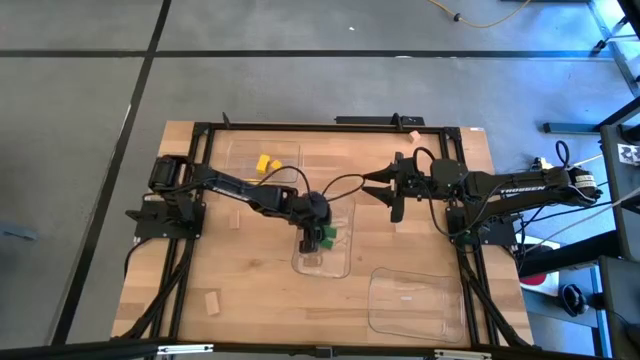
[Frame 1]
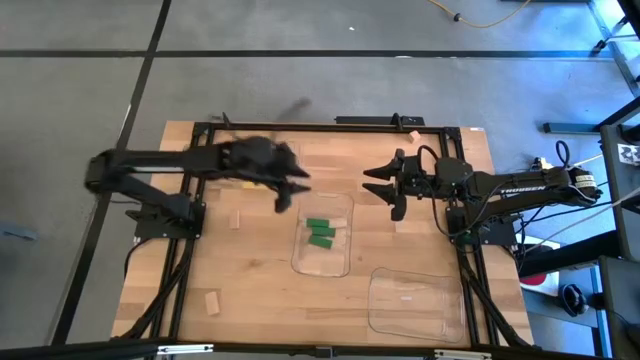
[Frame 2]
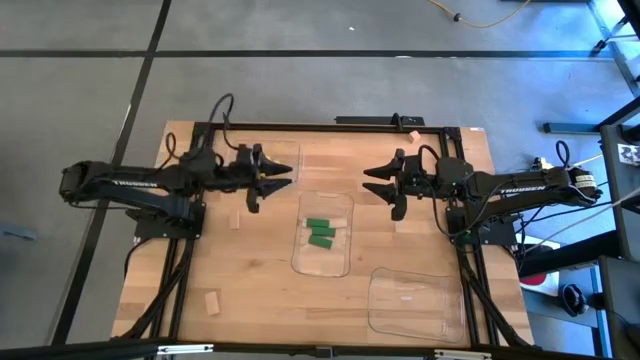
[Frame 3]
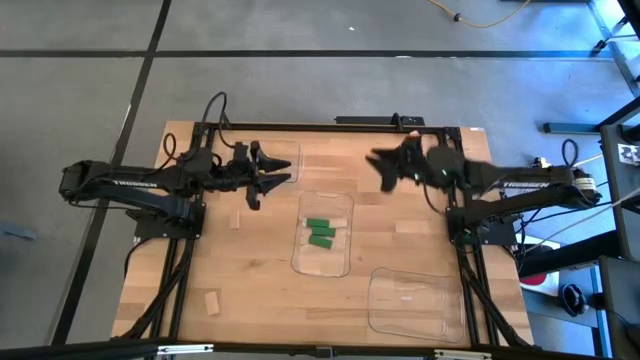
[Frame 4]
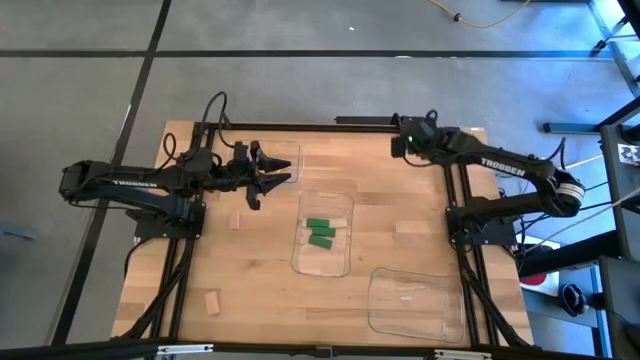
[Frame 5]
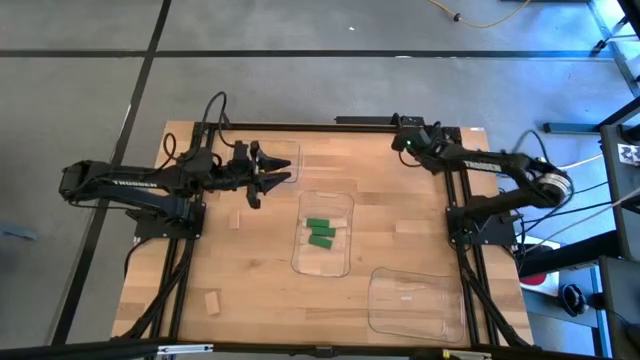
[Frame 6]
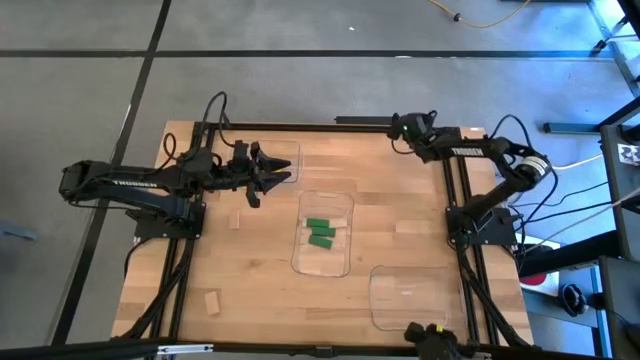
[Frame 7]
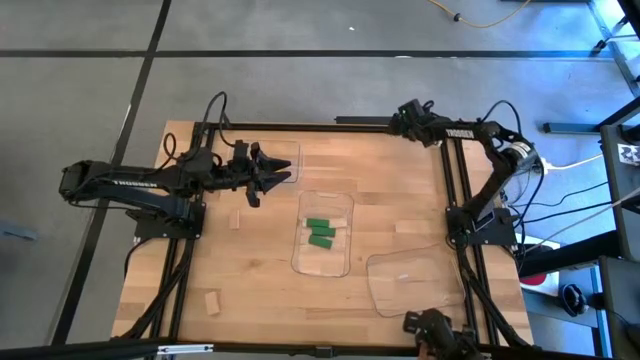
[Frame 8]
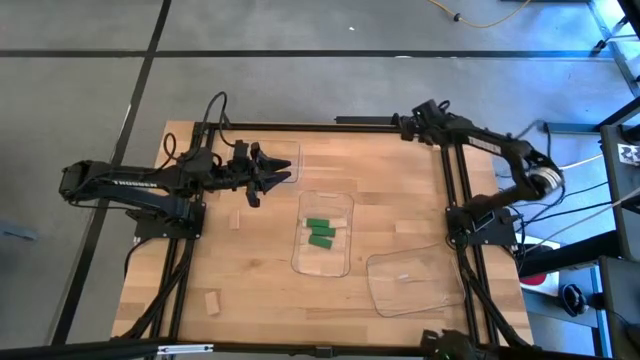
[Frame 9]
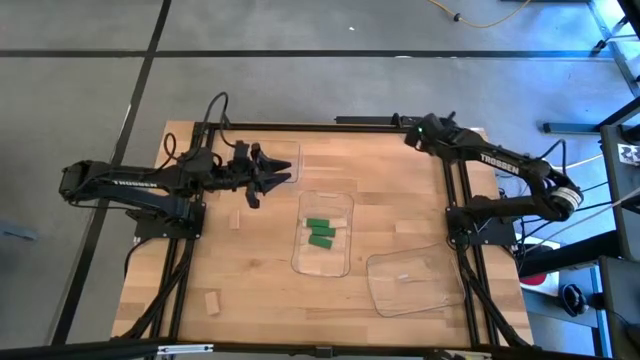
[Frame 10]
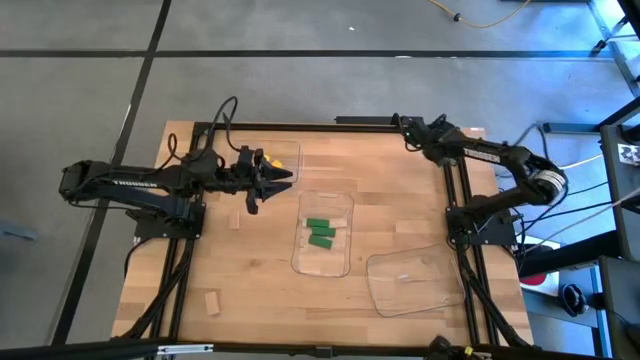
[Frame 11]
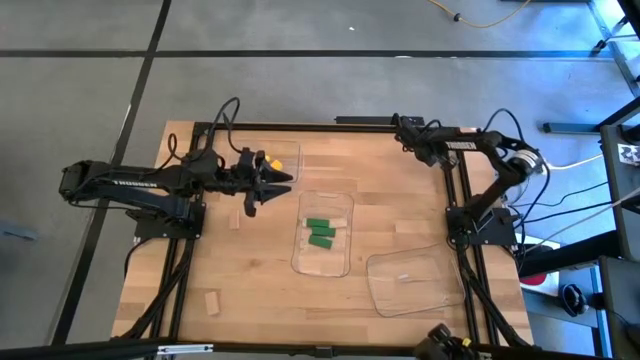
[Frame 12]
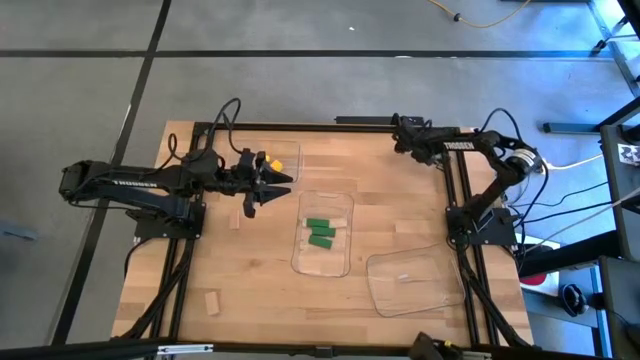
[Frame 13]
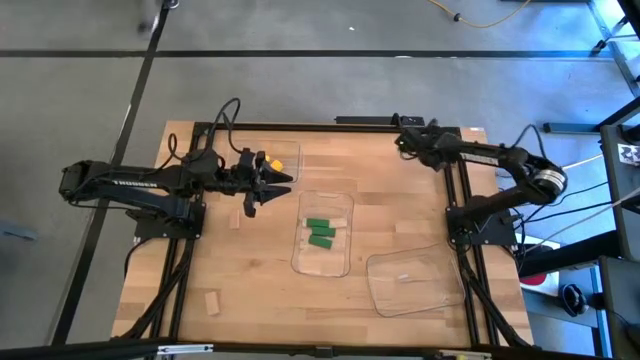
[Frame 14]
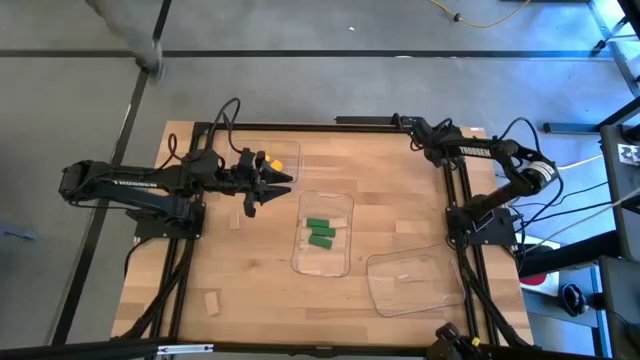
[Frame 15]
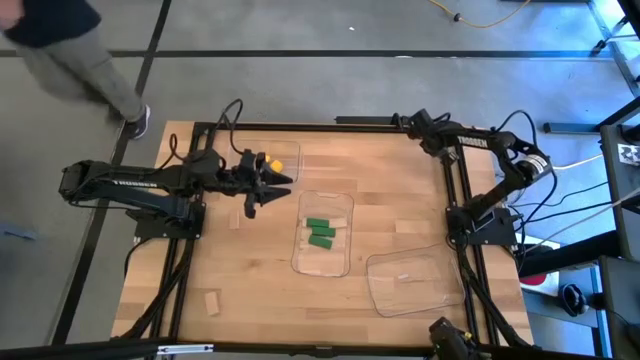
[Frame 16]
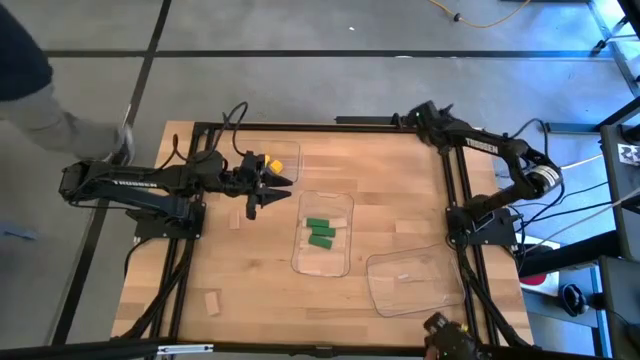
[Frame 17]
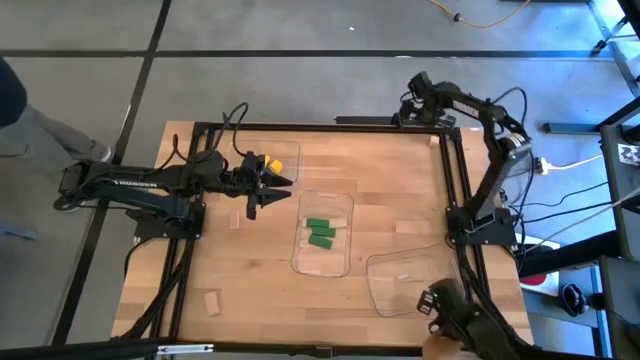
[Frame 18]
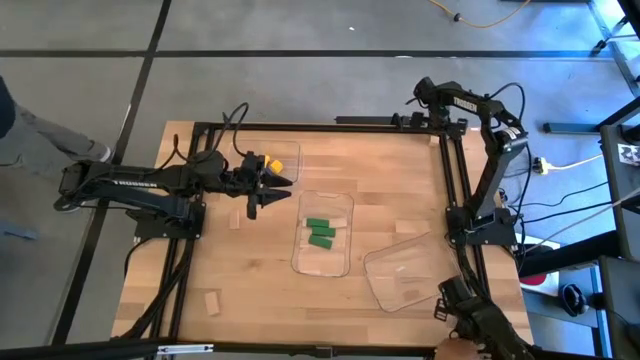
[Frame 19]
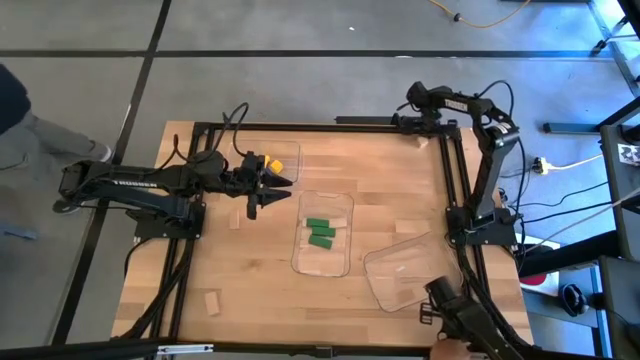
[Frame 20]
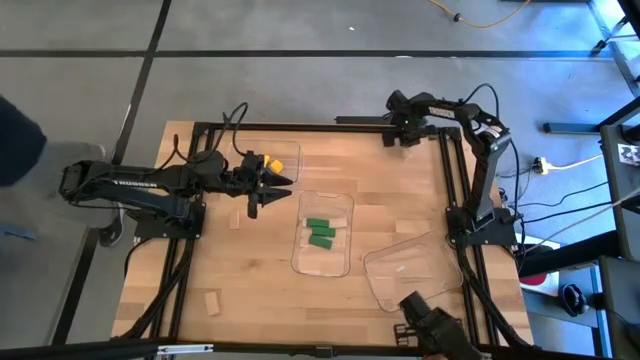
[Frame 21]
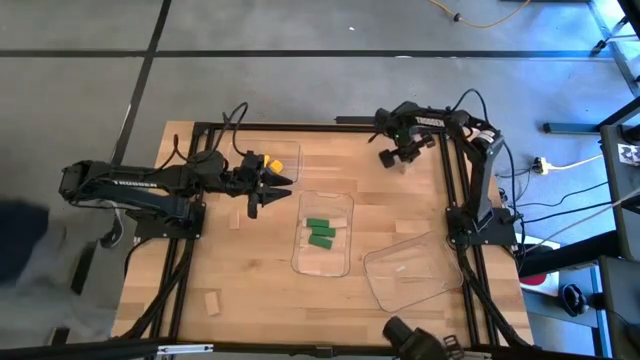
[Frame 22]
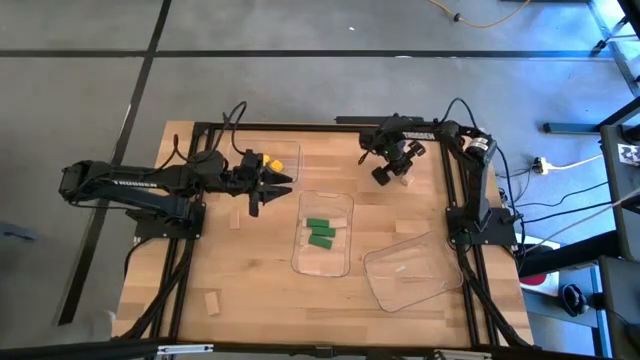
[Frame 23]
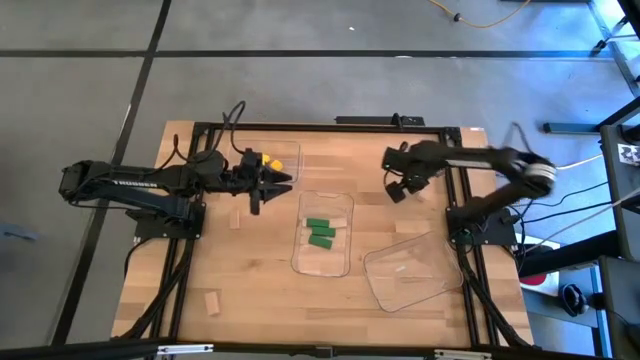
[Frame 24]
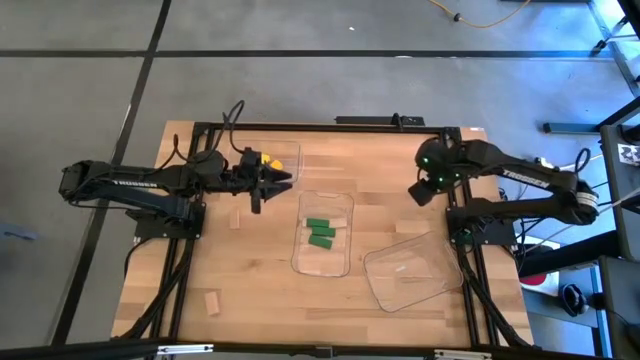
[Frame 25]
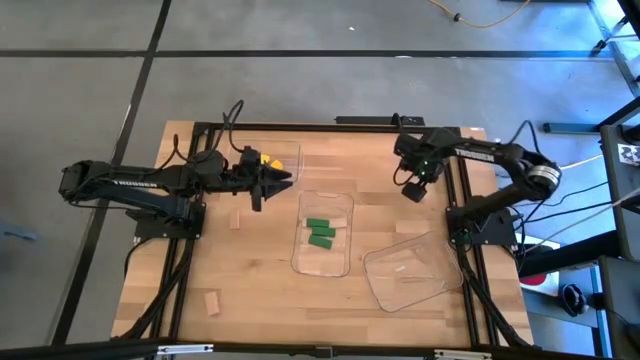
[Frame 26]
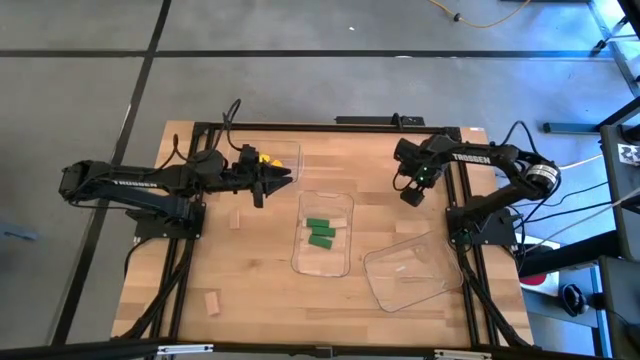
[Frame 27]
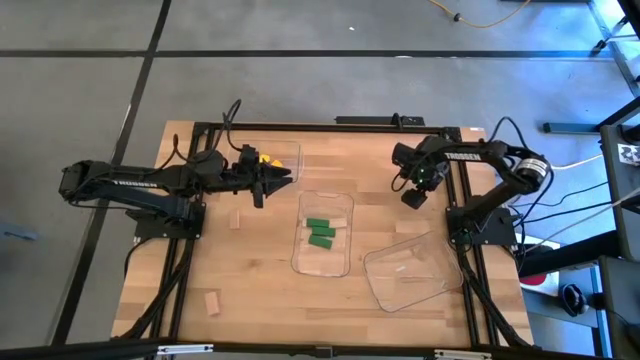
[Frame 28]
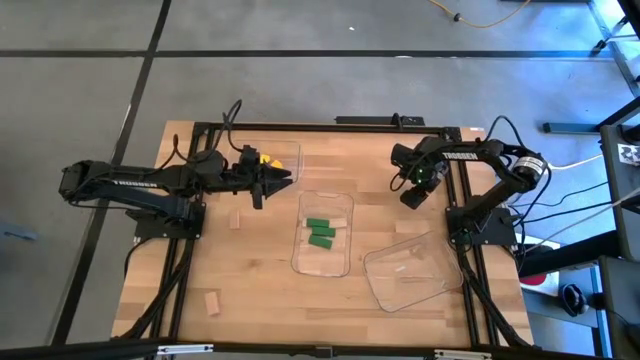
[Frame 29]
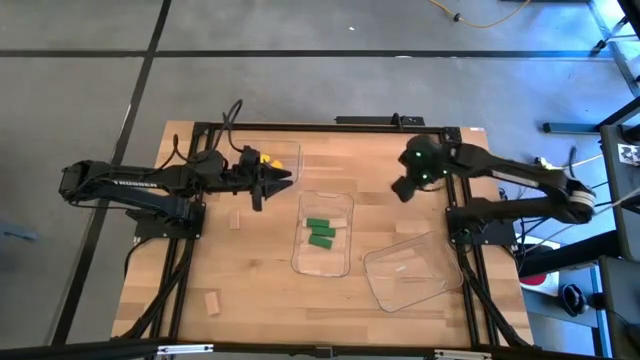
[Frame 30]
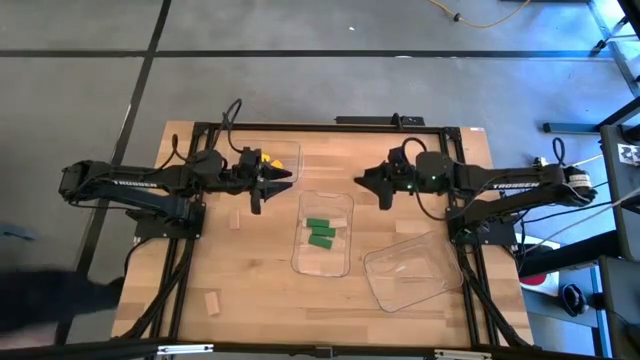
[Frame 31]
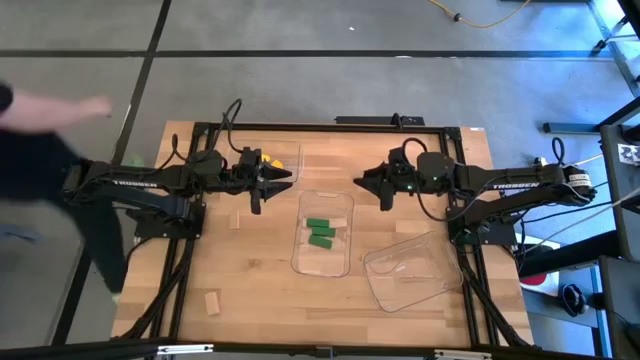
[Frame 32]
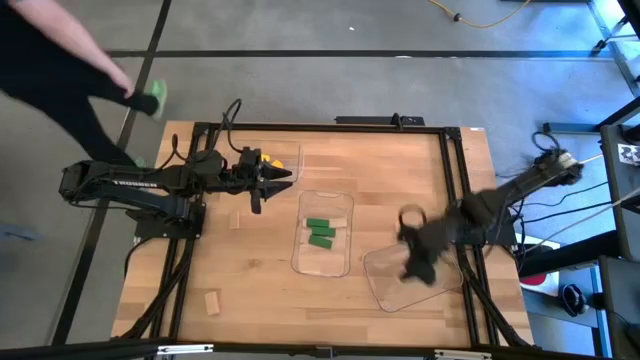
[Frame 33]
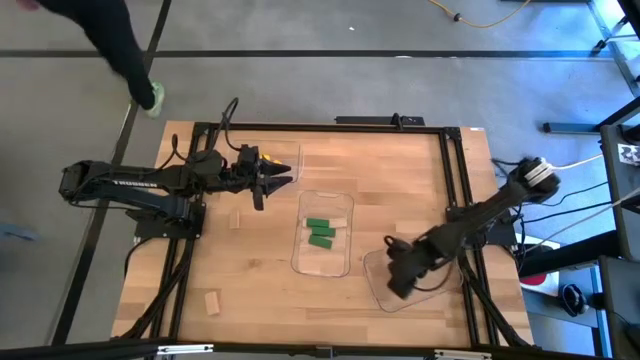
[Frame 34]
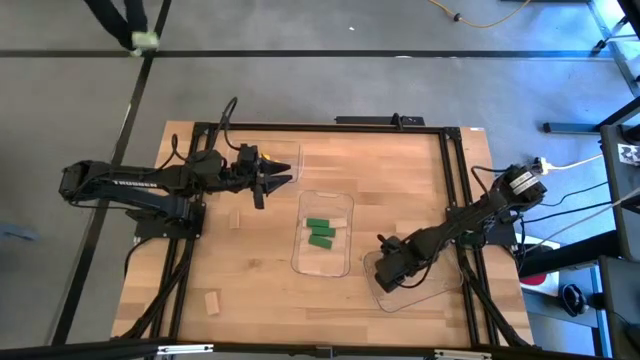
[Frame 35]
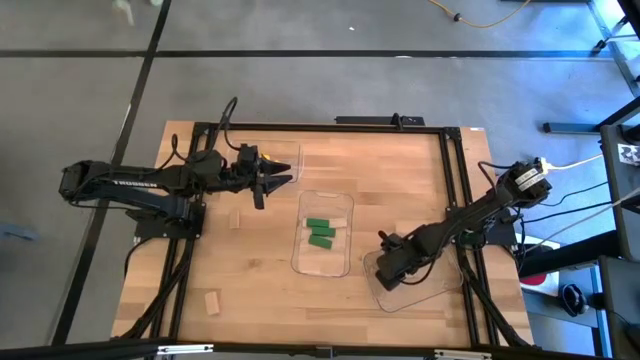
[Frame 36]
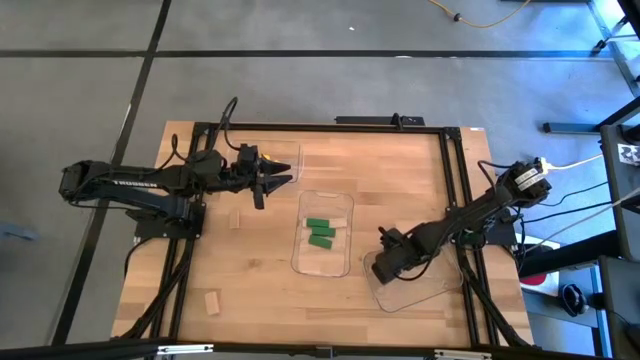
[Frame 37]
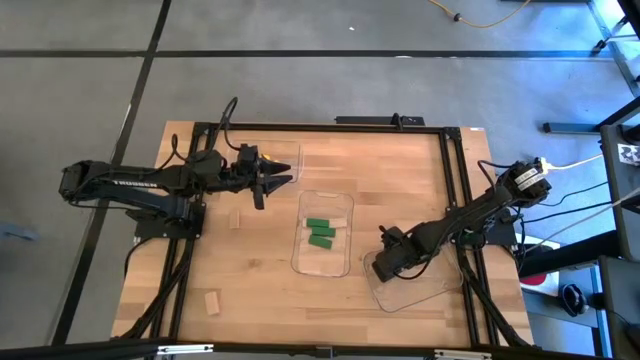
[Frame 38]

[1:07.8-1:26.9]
Task: Sort & place blocks by color
Put the top right light brown block into the bottom transparent bin
